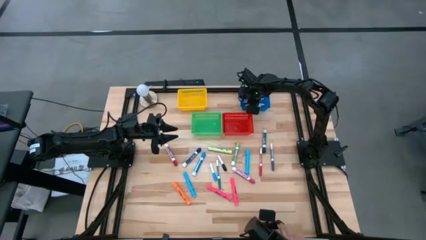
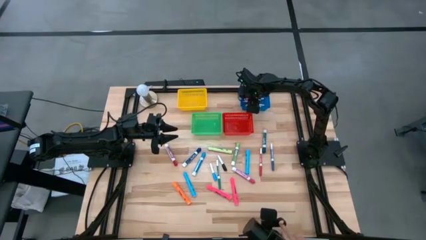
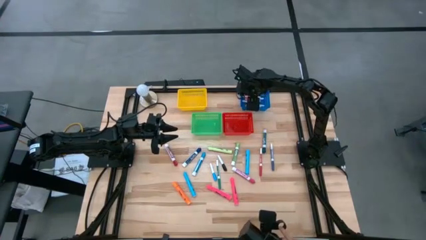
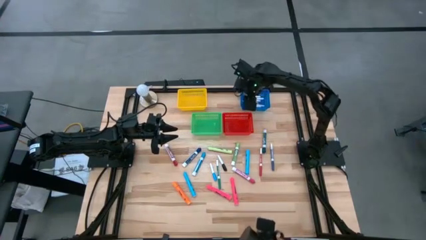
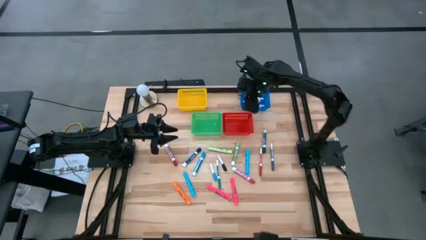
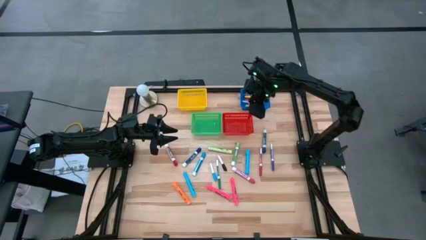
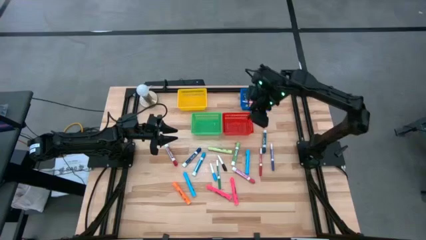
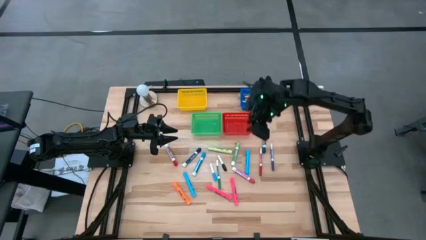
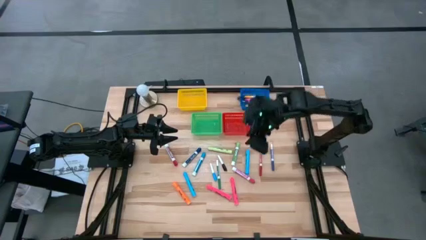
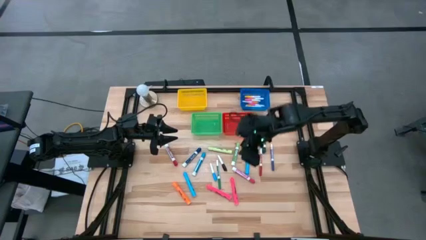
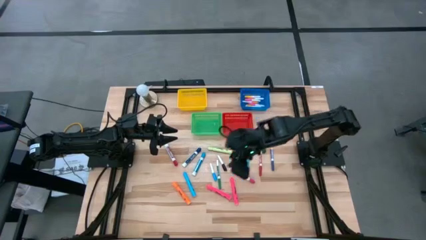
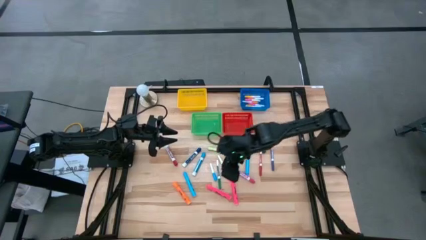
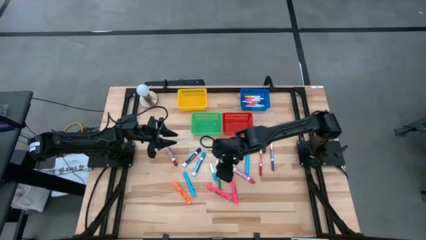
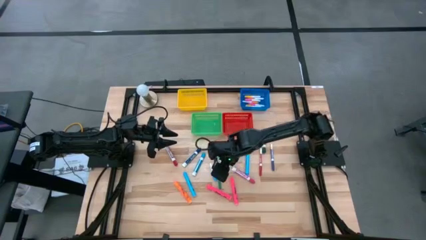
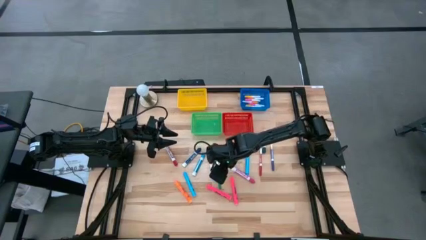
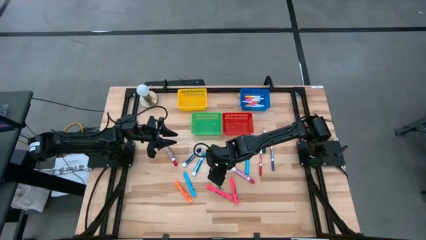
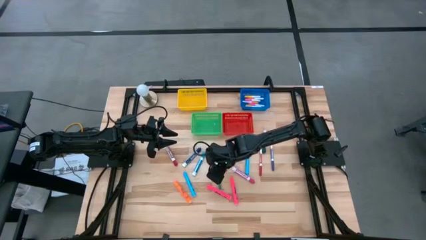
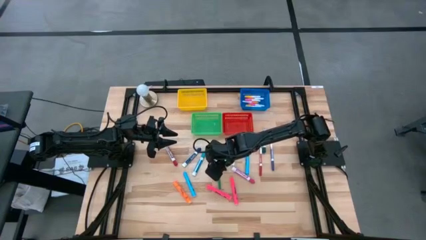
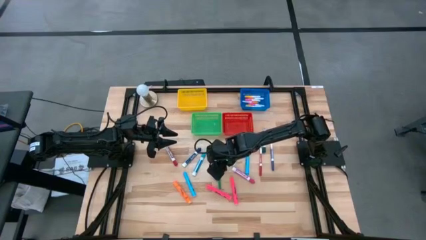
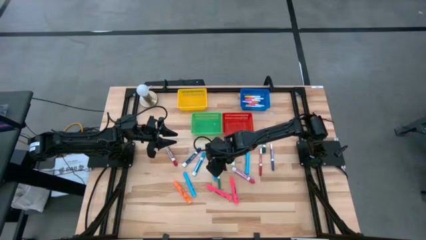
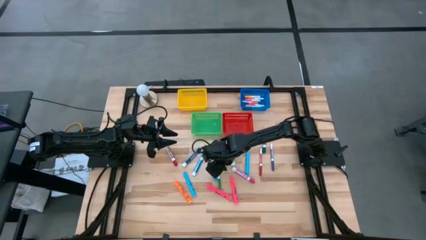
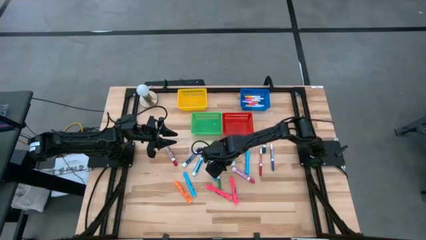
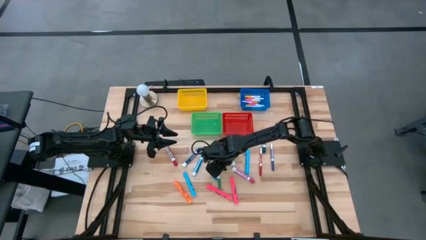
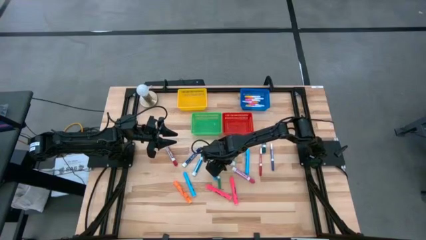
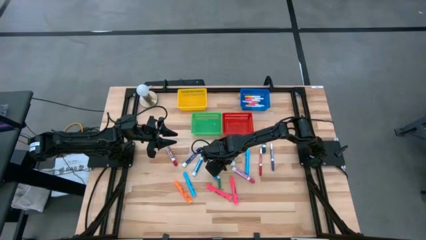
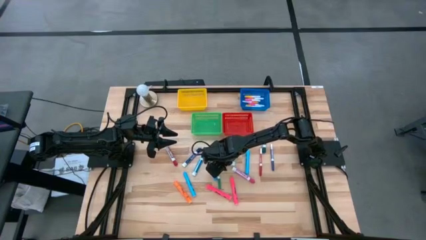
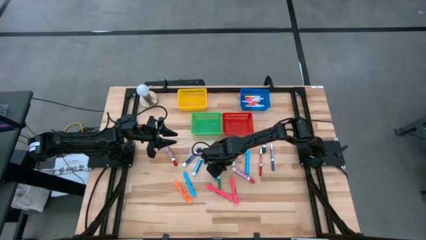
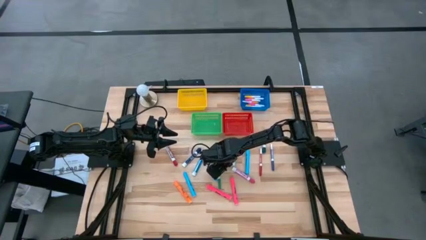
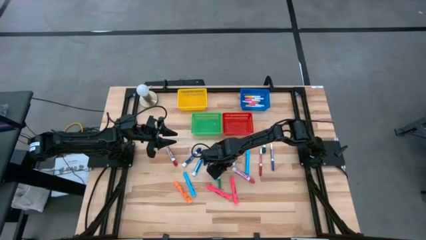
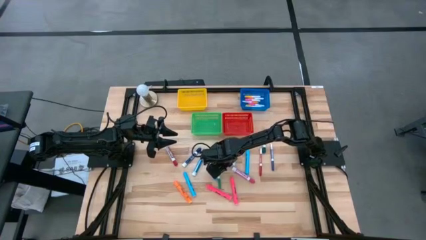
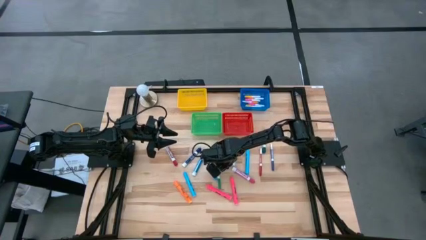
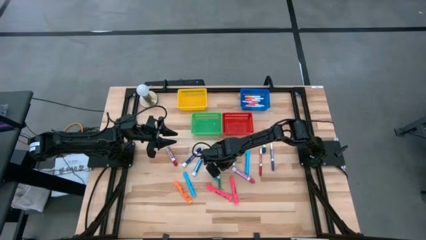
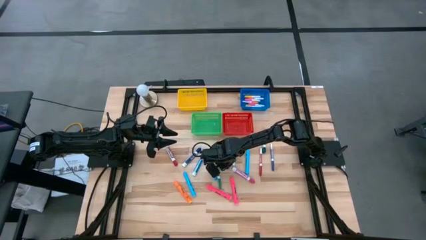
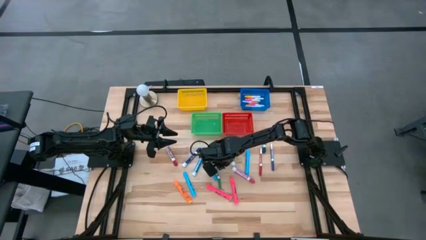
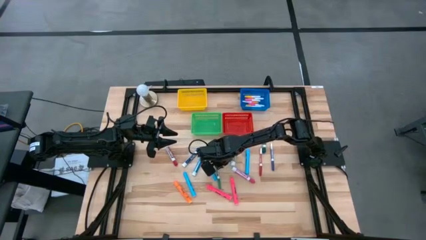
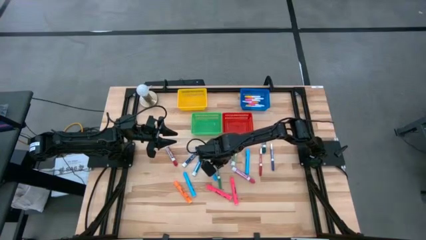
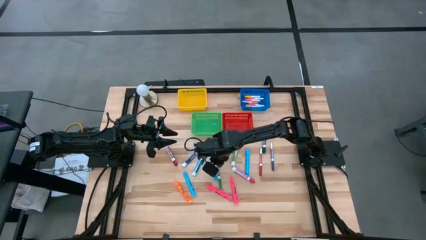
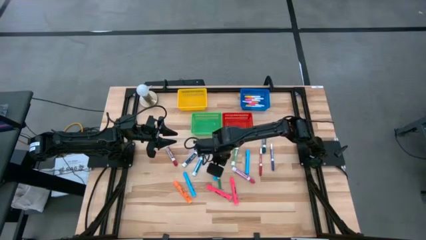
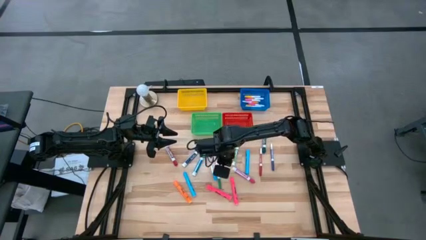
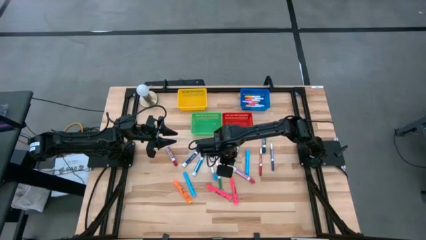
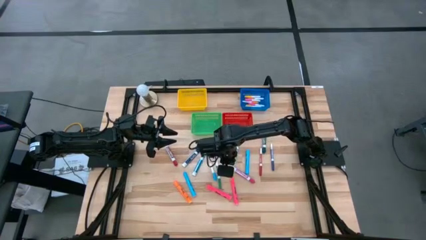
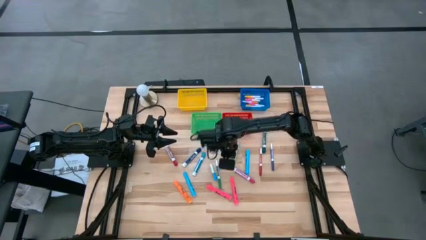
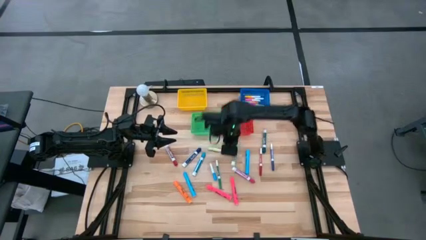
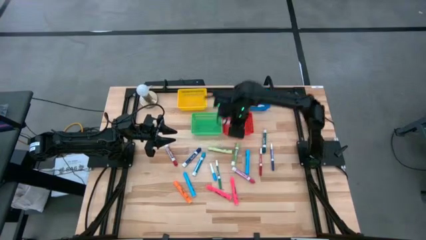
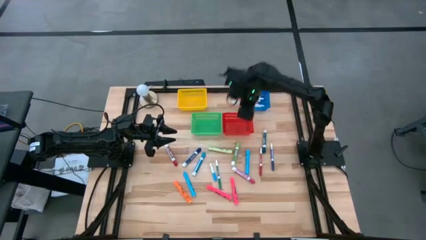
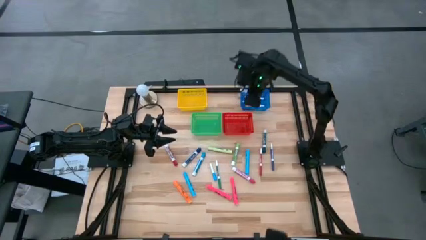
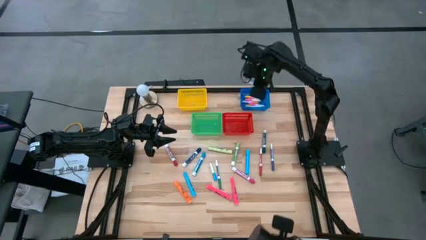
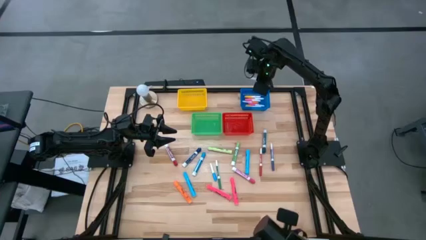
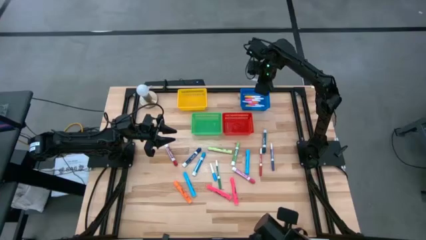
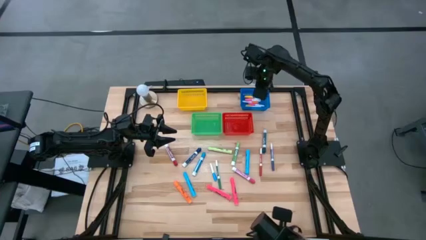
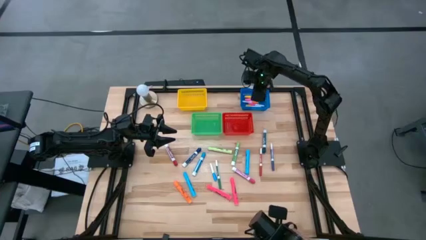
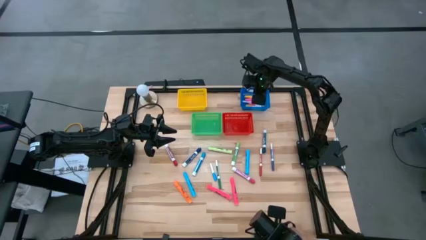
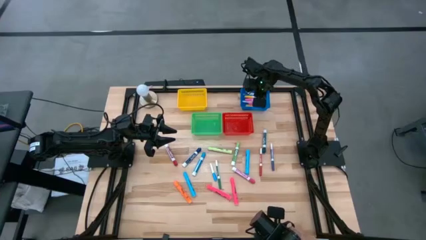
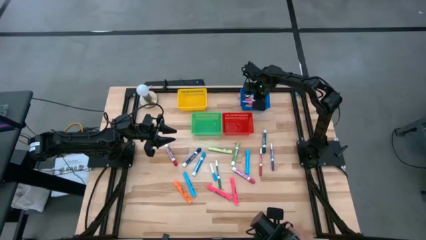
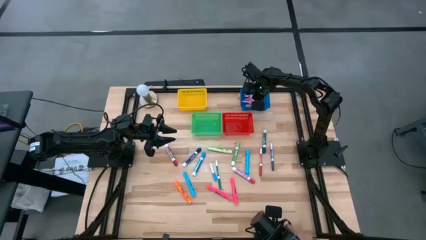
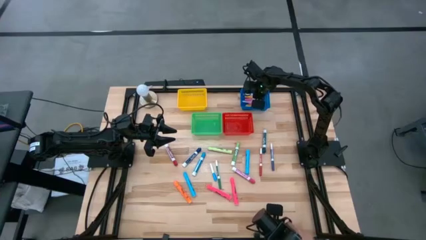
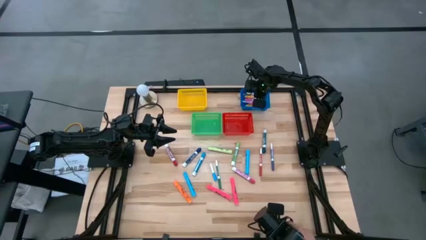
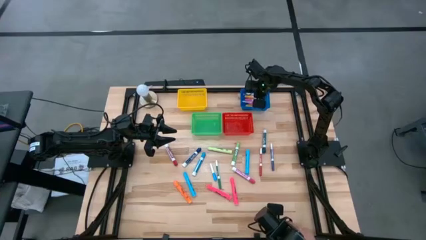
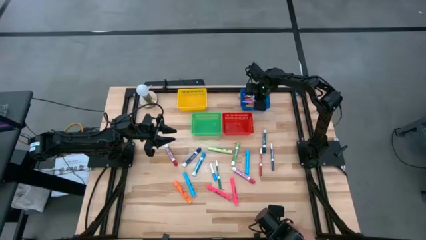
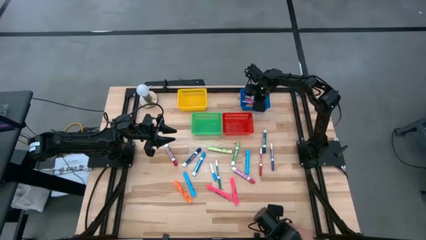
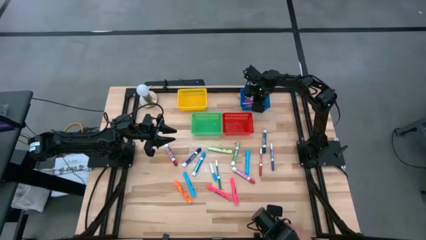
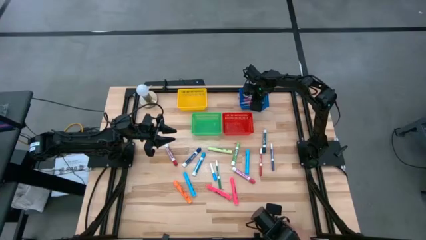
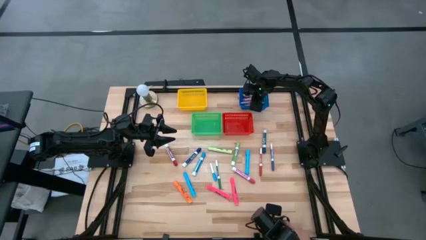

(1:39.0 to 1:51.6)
Task: Pick & Place Markers
Put the black highlighter into the blue bin
